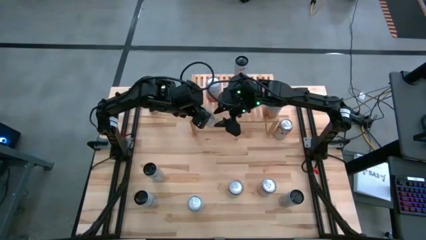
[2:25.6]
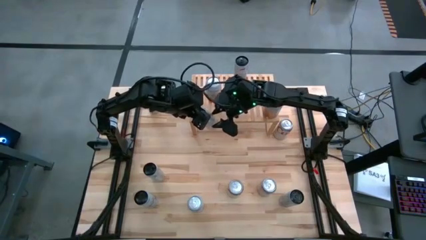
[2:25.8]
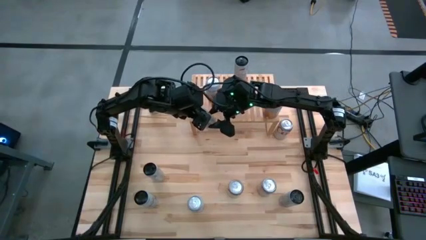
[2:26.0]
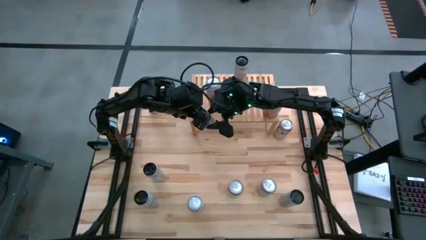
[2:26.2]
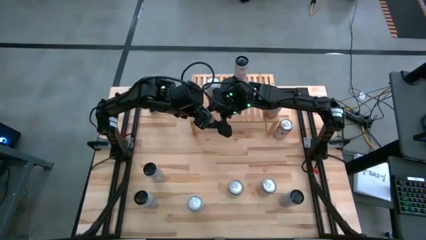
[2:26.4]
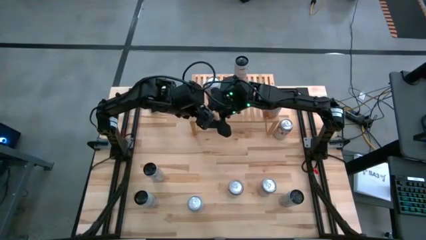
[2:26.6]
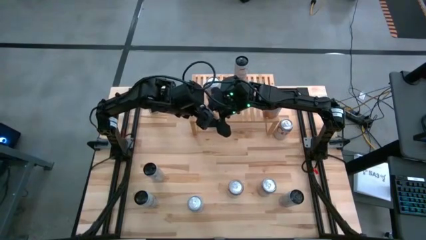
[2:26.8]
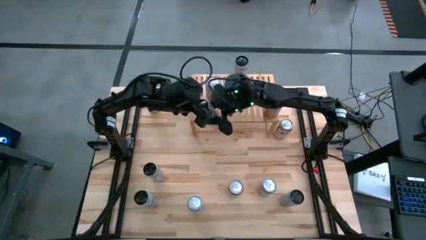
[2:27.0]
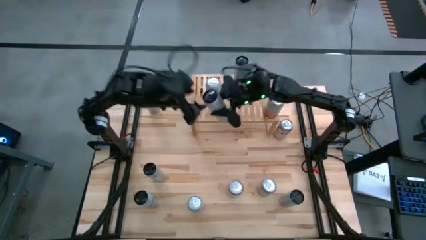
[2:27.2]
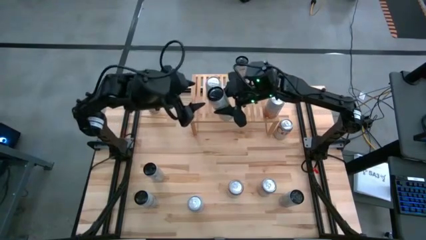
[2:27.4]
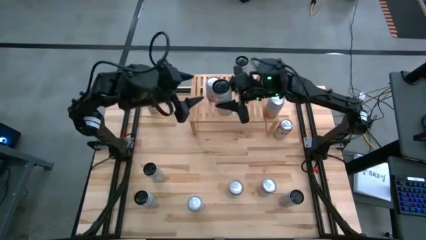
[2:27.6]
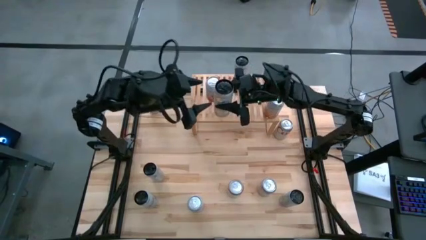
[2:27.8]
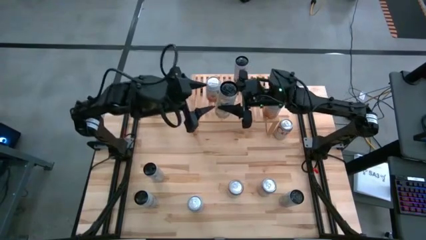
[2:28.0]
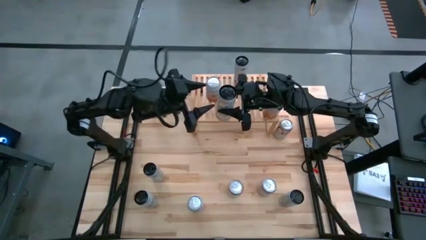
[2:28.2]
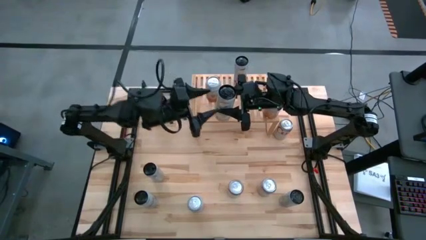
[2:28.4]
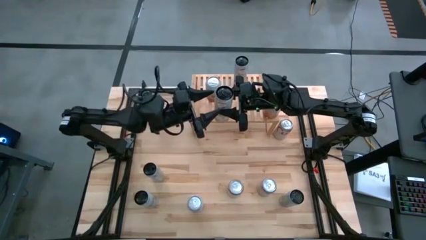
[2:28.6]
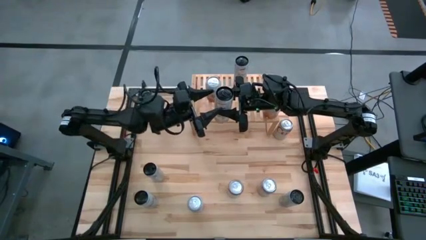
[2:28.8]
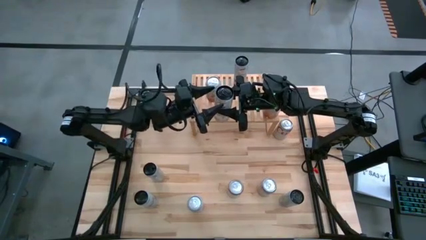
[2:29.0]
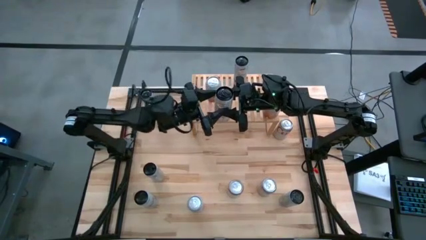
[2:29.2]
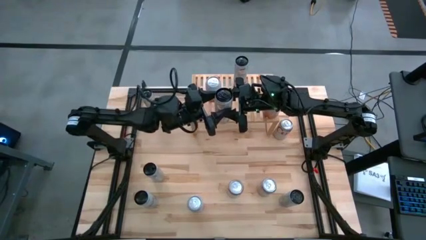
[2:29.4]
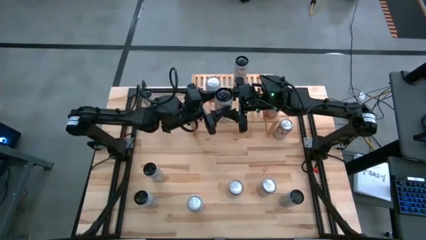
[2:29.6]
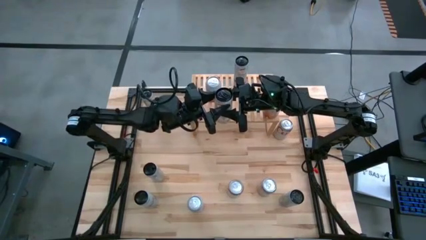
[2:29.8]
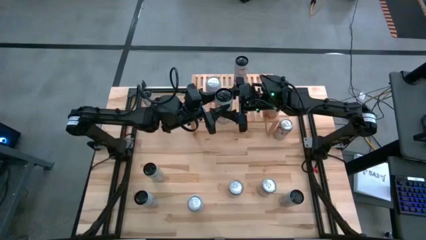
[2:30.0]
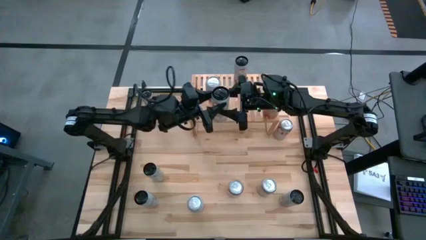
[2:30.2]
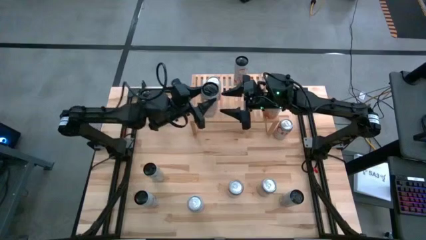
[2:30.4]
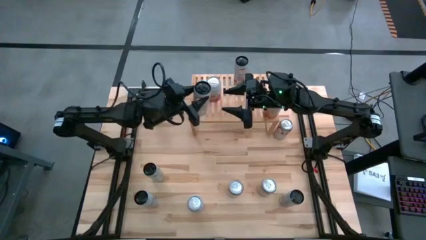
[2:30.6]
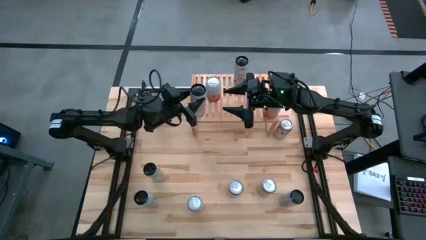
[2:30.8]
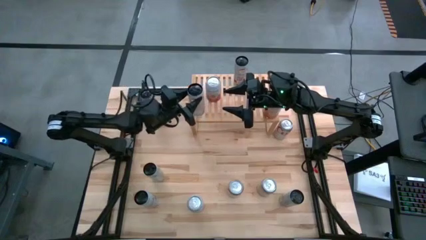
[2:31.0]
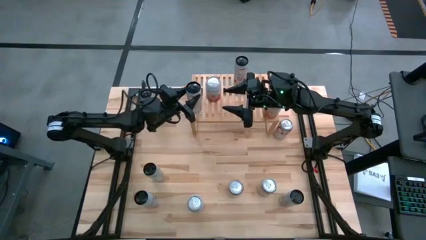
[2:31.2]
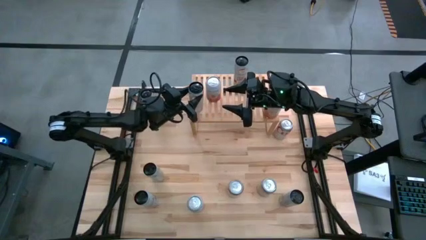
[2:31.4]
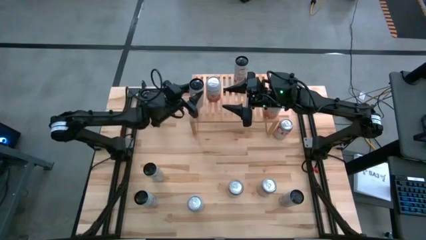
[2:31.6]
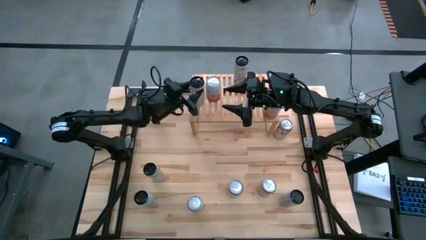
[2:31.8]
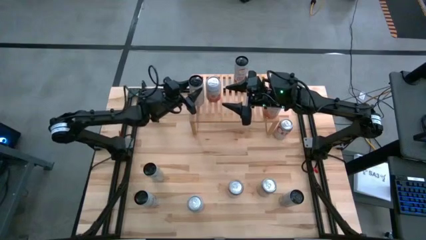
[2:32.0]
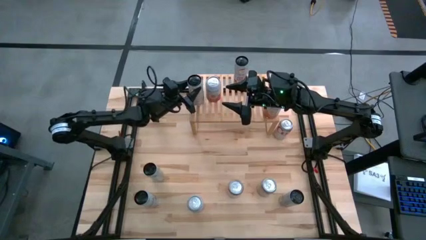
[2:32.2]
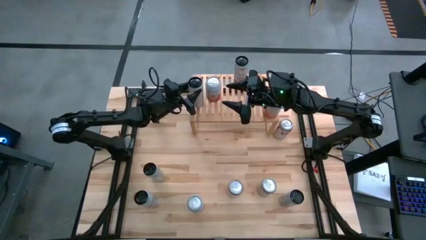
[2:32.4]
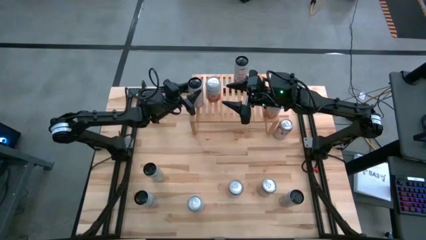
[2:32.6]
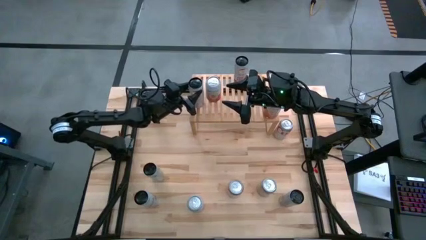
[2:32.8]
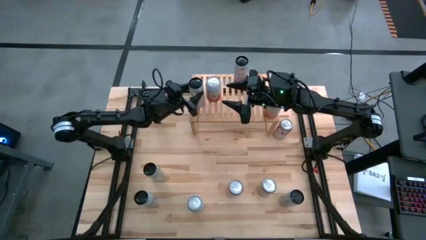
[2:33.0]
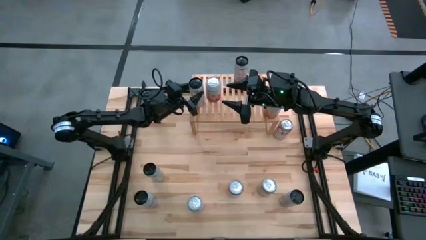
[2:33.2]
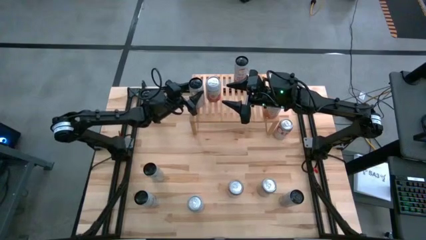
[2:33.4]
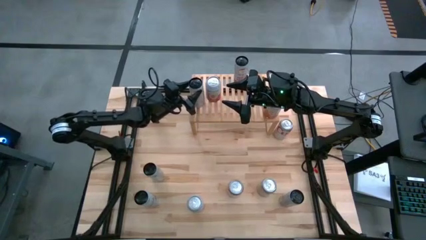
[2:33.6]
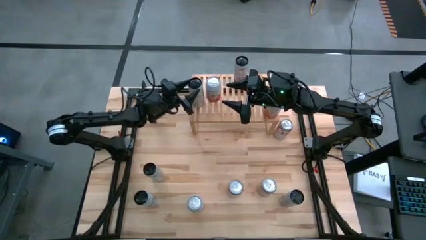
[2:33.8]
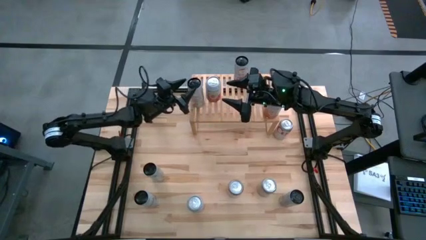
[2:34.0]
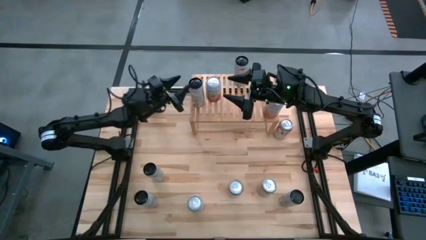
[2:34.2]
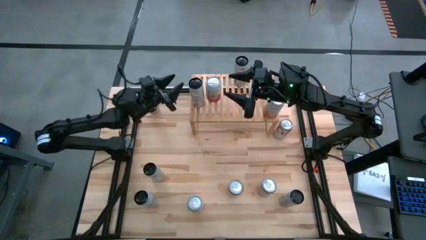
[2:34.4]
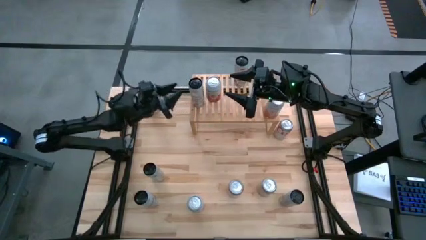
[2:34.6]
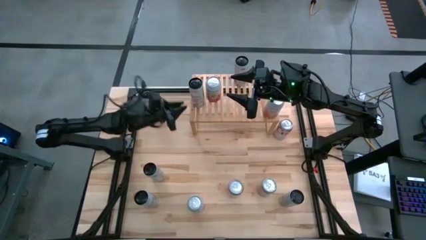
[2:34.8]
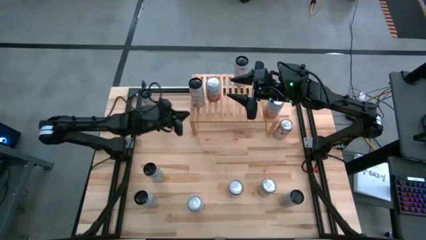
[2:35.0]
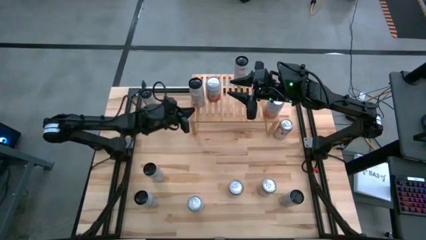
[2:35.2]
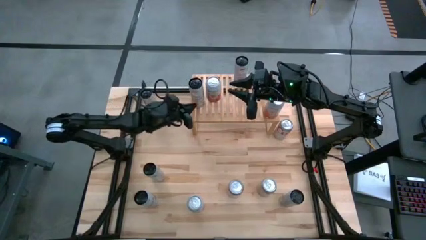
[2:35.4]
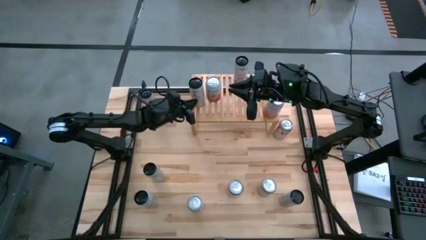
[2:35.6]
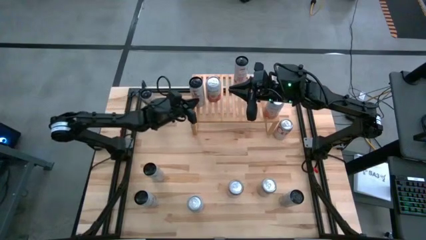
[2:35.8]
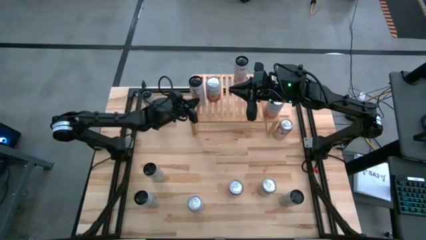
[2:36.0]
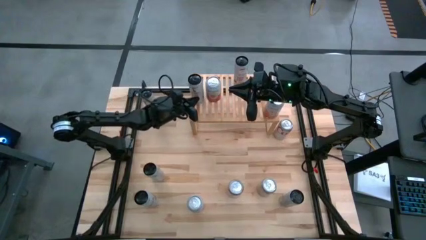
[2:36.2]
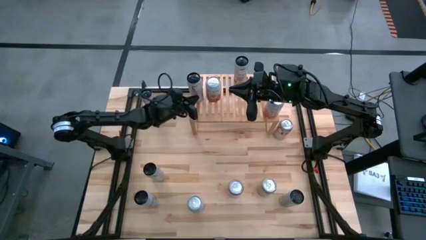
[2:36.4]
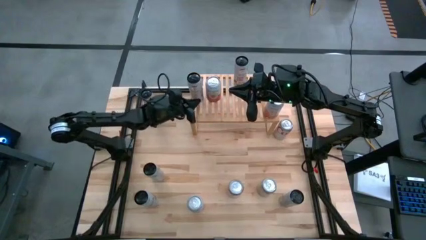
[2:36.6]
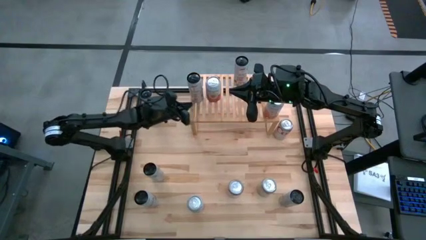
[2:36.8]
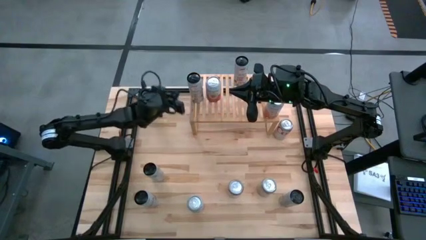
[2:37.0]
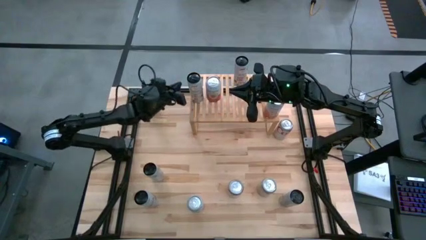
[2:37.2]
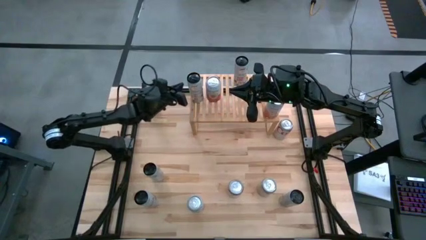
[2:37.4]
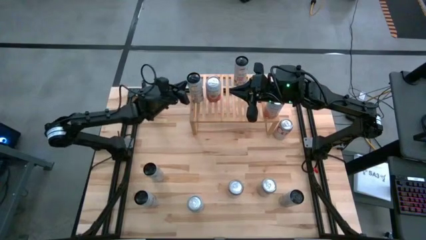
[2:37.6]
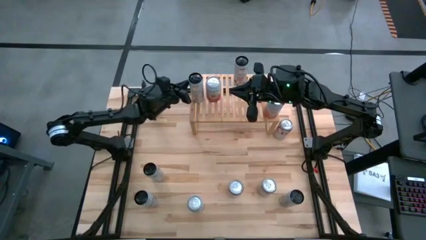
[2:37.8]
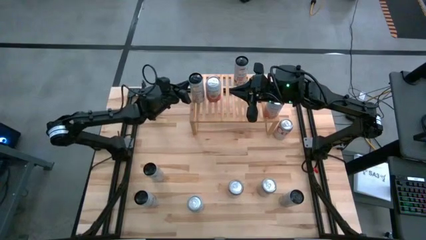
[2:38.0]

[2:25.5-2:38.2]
Task: Place canned beverage on shelf
Put the bottom white and yellow soda can on the shelf

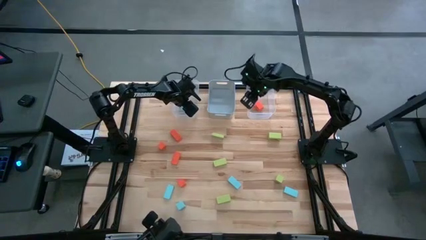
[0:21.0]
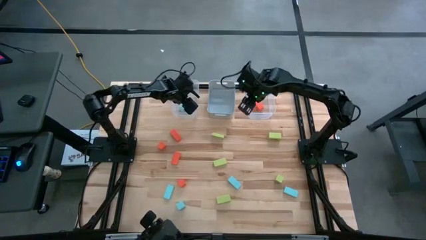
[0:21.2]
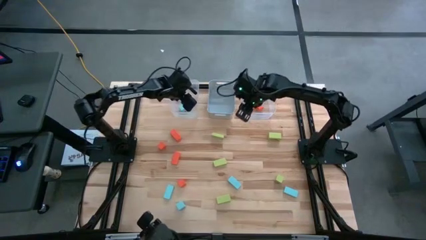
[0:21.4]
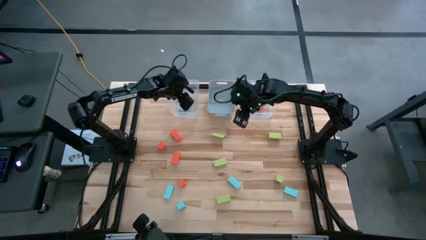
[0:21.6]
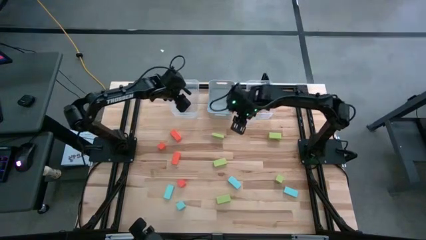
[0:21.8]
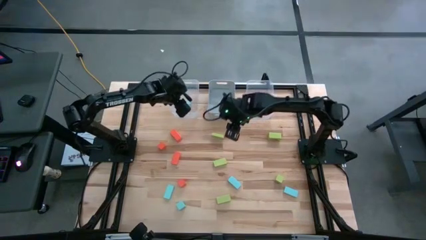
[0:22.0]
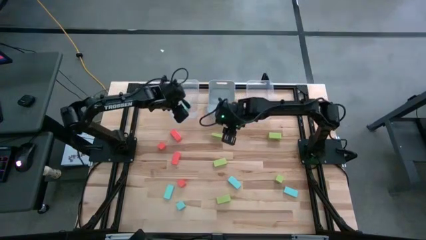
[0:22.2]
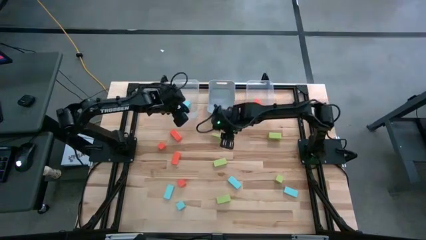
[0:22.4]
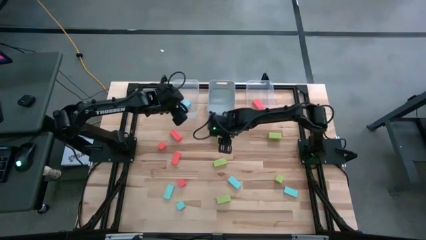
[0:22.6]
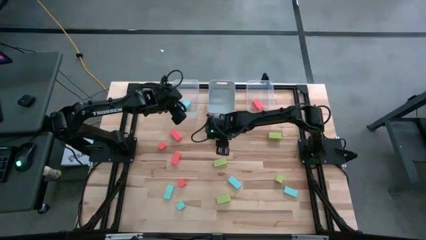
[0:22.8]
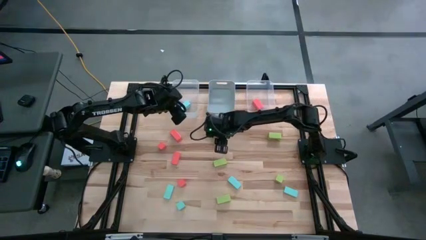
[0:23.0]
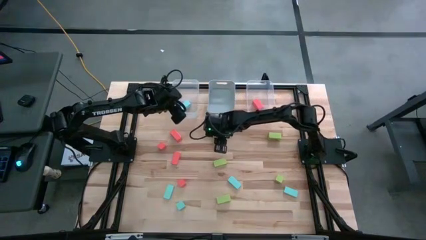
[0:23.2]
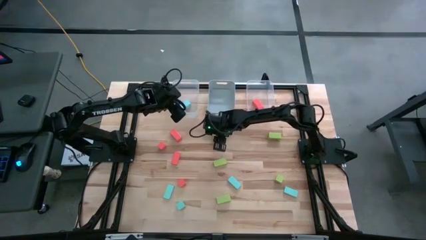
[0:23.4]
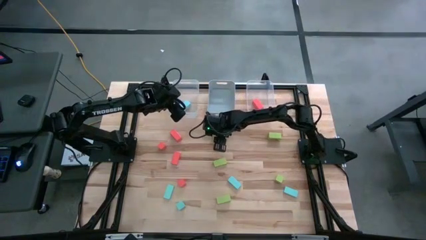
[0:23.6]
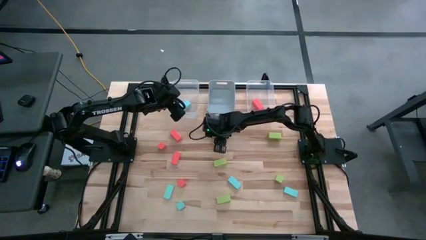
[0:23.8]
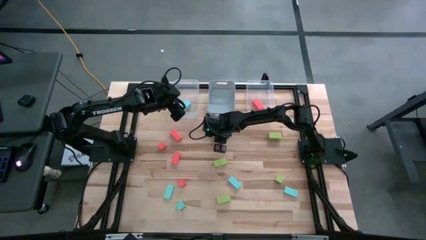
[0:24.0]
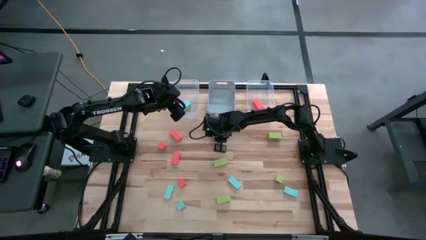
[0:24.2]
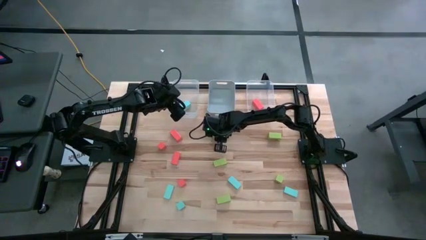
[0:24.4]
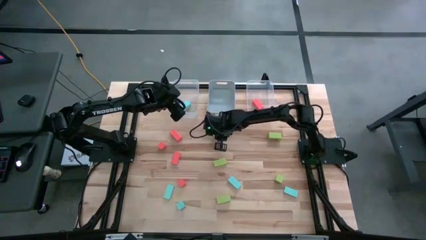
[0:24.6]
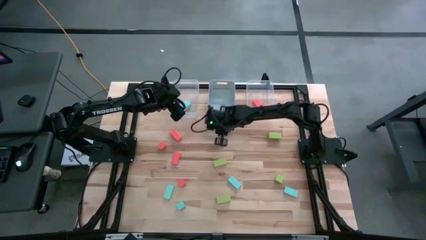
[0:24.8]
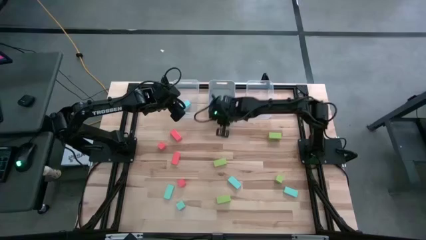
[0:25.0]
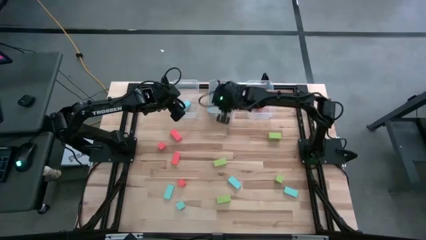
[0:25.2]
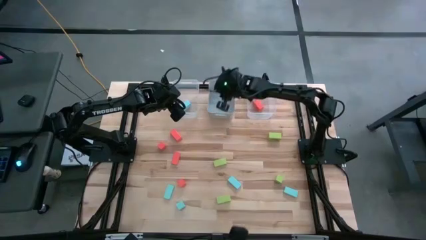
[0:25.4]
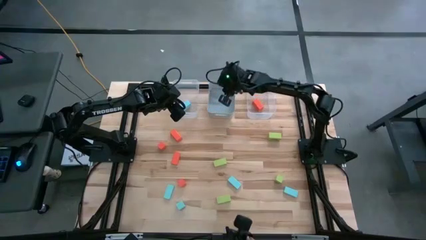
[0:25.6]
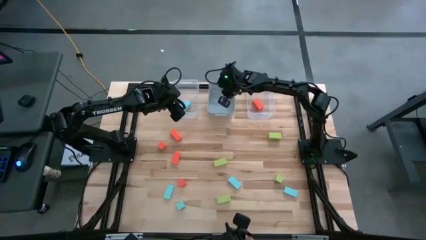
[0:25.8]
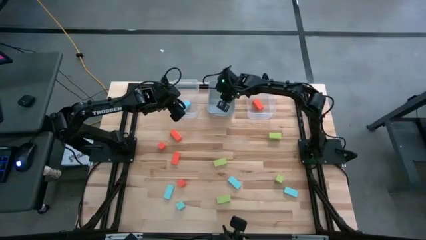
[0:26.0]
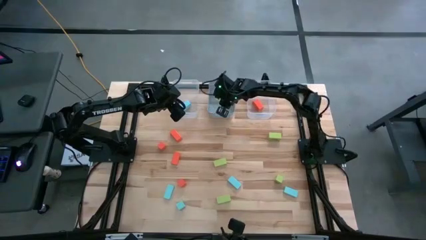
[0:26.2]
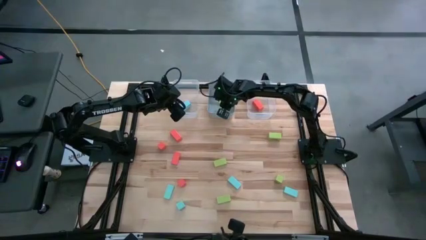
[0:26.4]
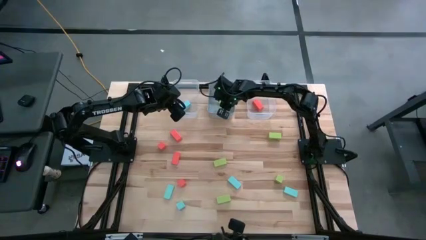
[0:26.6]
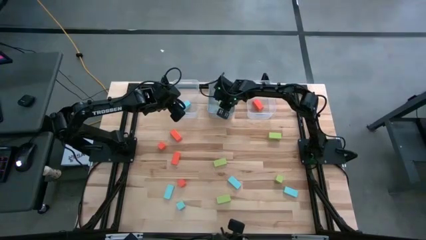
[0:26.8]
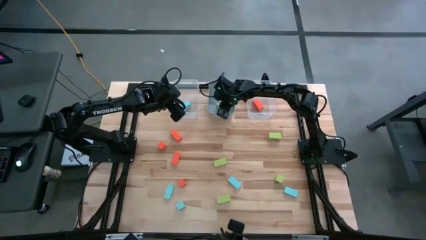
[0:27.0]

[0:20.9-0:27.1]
Task: Sort & place blocks by color
Put the green block into the blue bin
